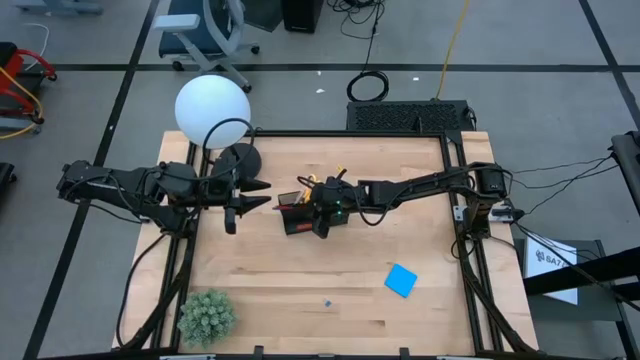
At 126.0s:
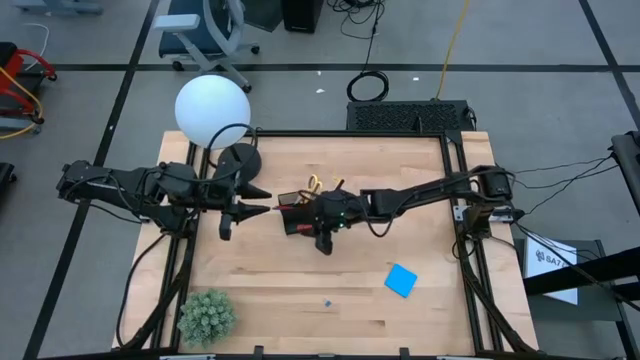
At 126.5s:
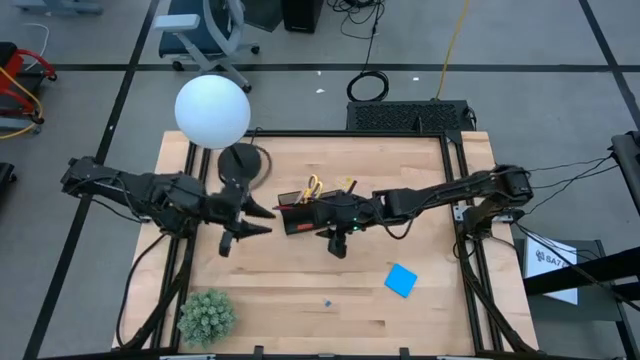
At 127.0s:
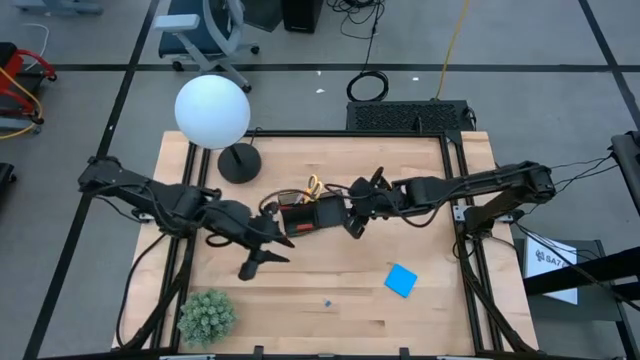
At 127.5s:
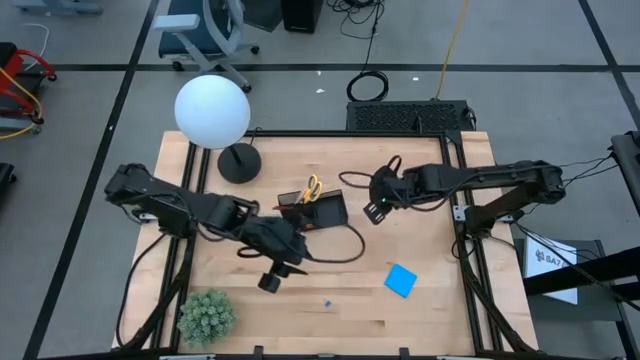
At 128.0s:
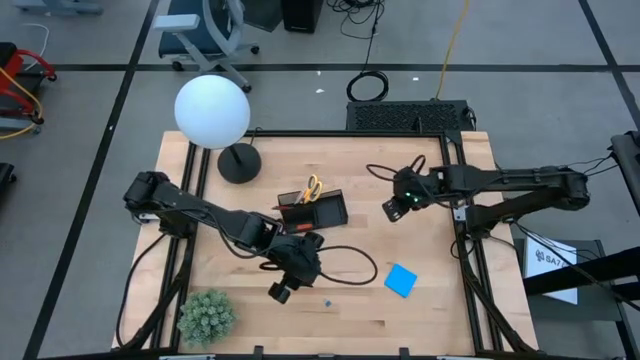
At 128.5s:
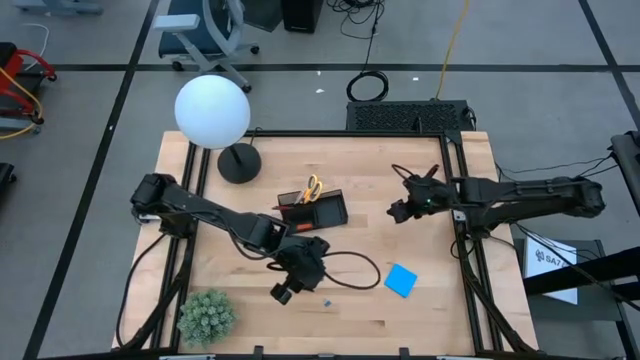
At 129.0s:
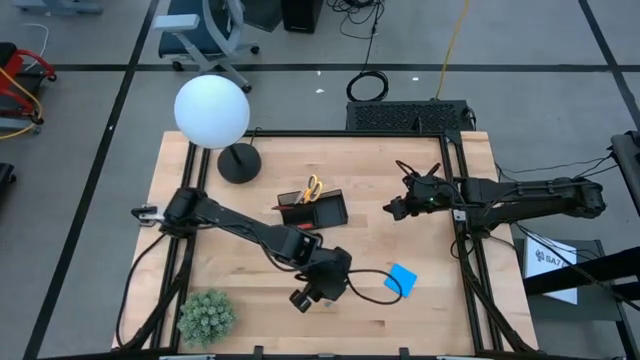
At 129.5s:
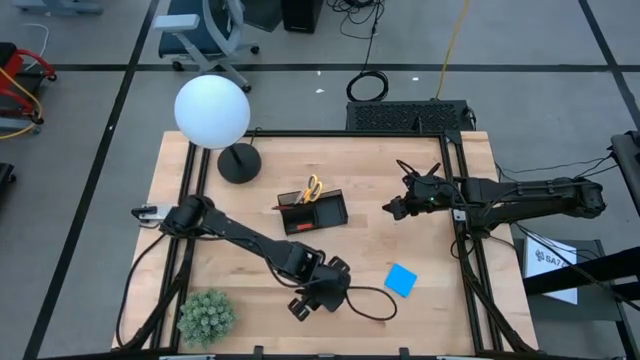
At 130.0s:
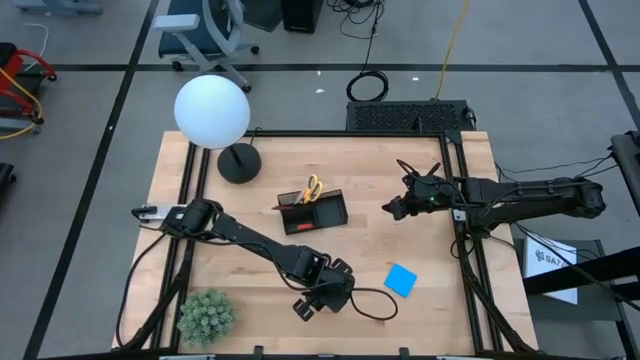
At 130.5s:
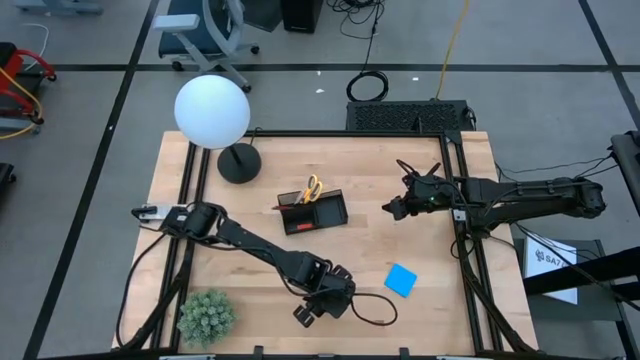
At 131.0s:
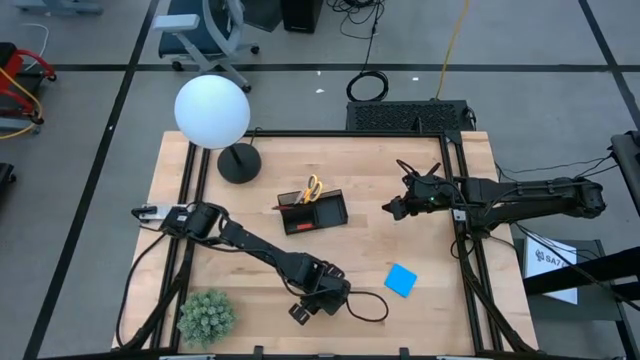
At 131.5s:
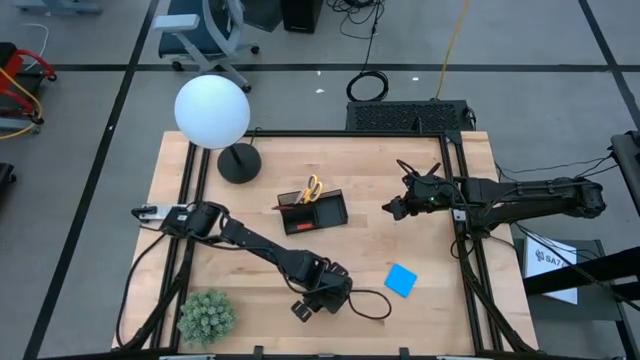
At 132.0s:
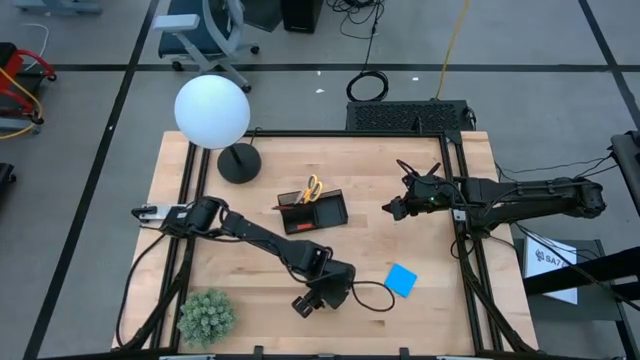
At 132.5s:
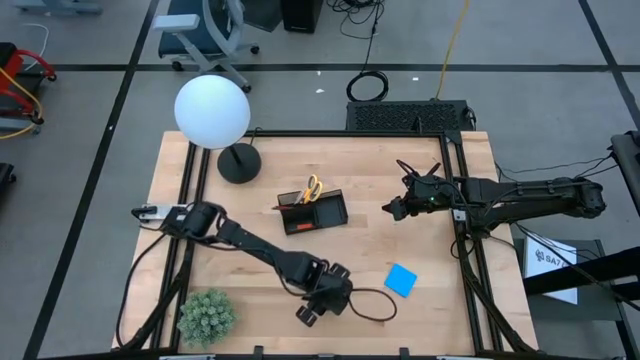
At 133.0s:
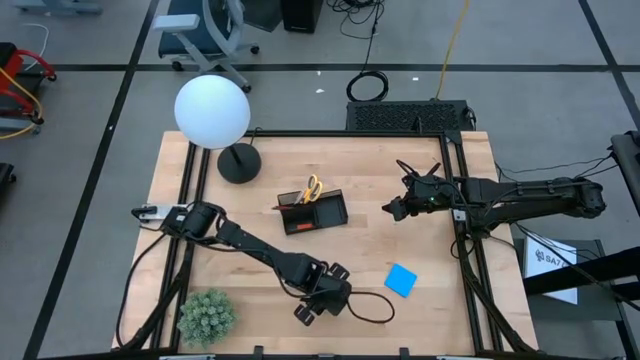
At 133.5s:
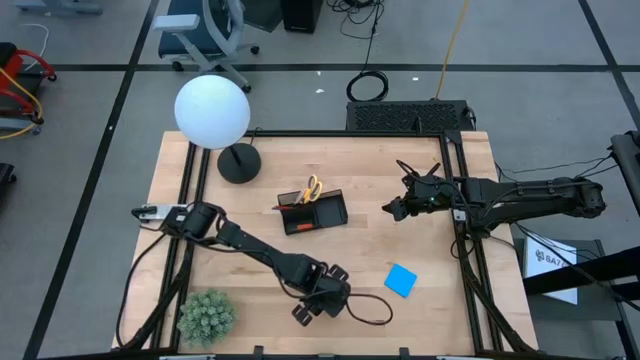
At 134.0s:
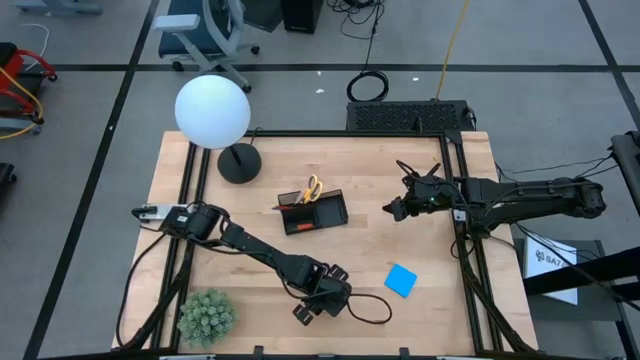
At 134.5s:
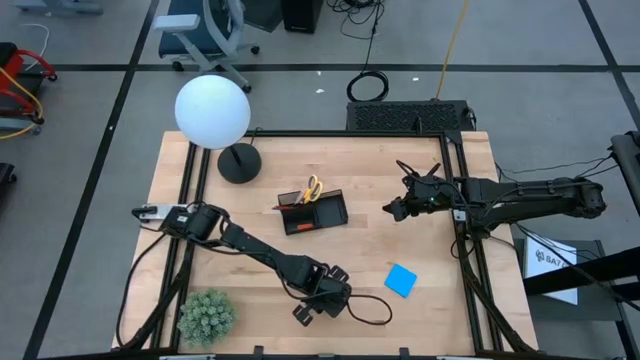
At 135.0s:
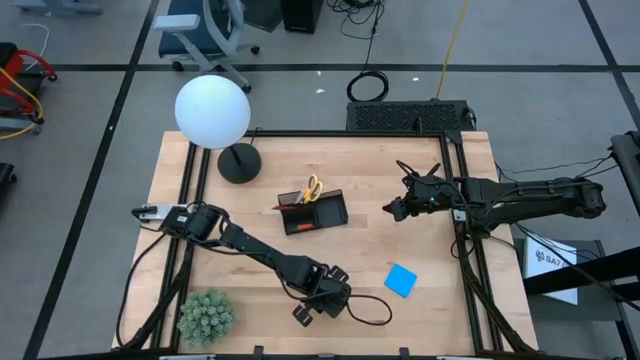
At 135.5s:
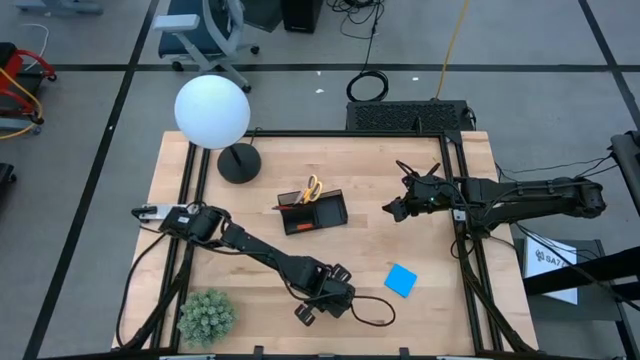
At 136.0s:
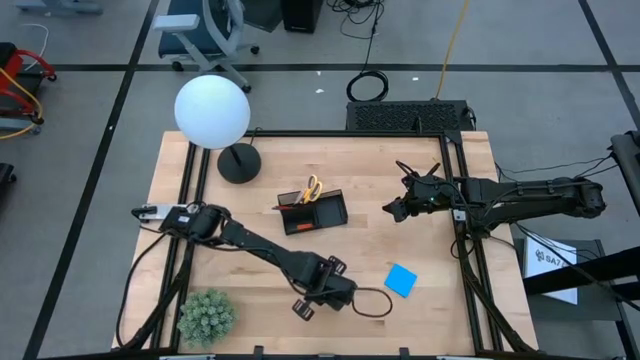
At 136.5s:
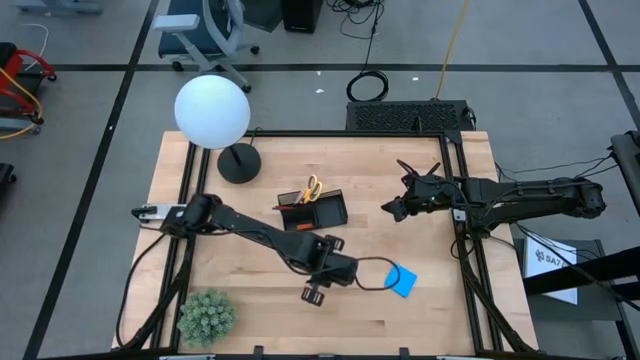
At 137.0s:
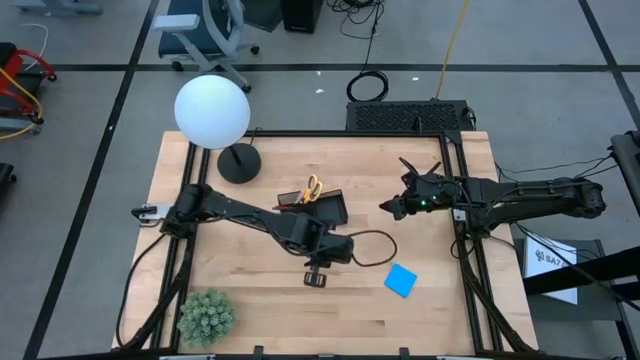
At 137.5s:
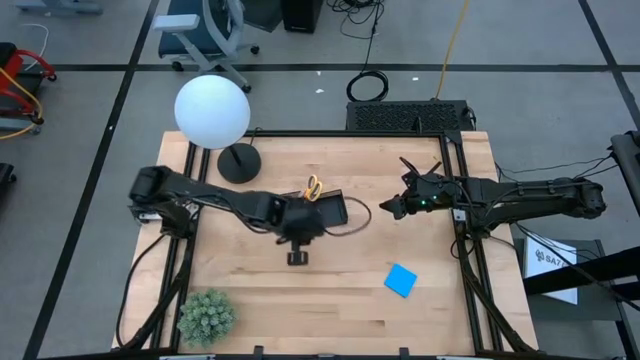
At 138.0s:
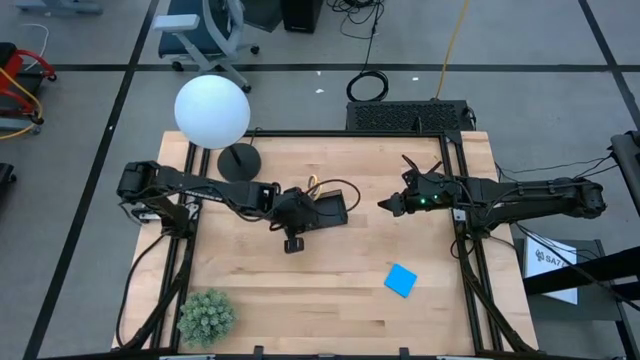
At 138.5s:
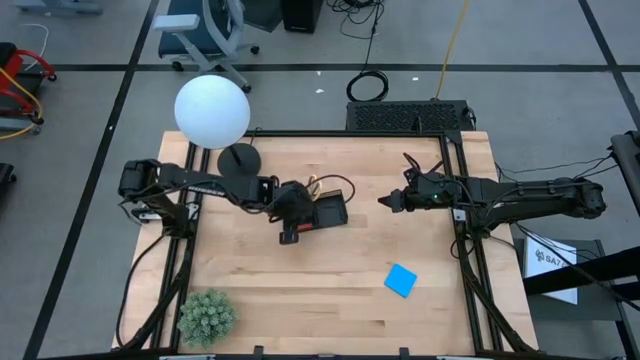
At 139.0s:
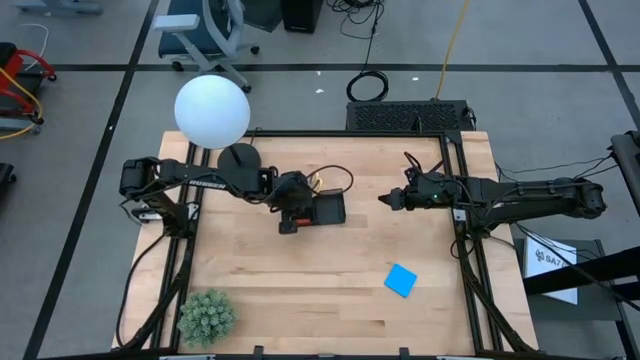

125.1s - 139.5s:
Task: Pick and place office supplies into organizer
Put the blue clip into the black organizer
